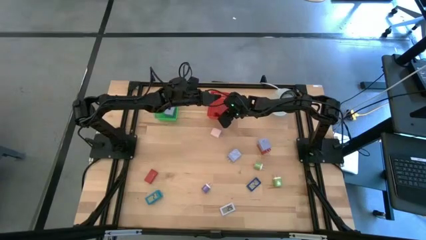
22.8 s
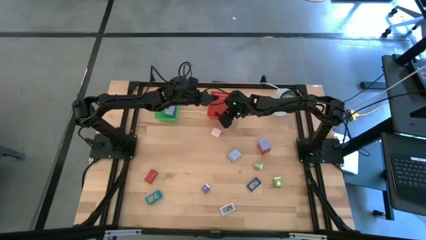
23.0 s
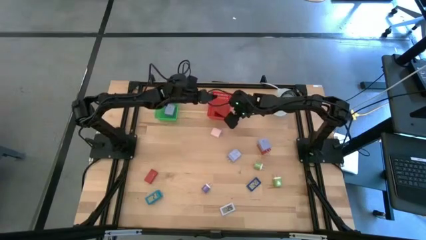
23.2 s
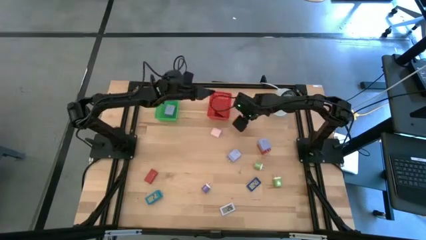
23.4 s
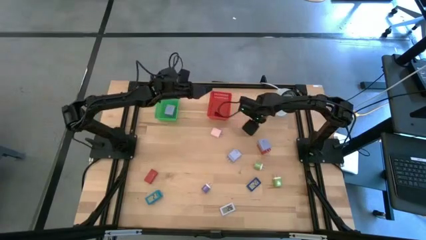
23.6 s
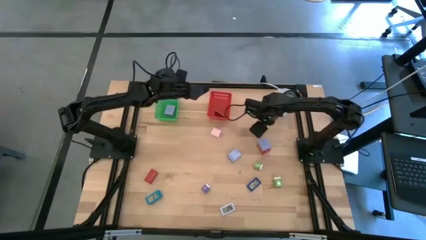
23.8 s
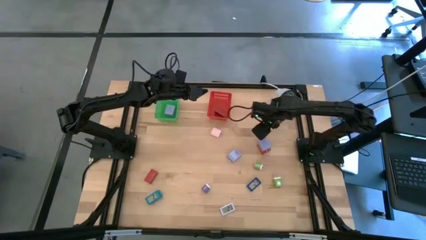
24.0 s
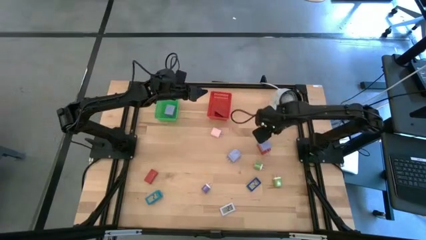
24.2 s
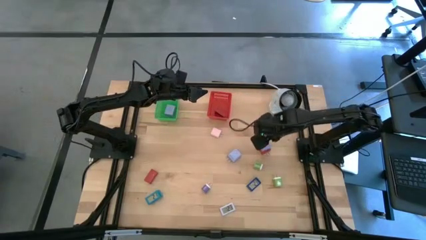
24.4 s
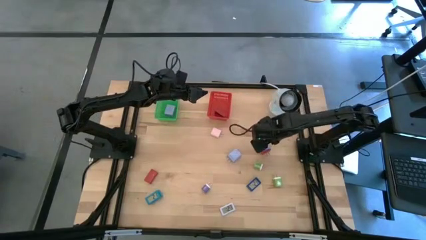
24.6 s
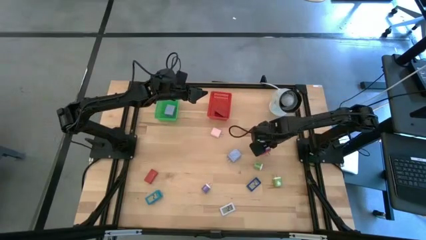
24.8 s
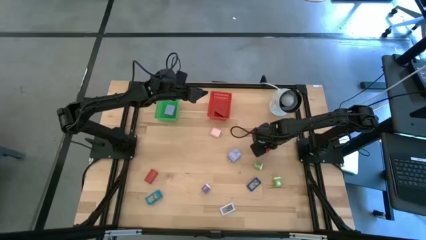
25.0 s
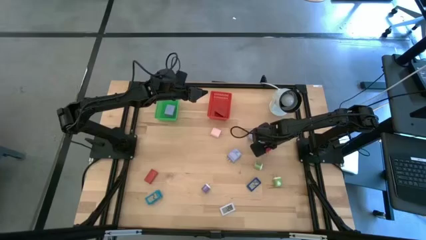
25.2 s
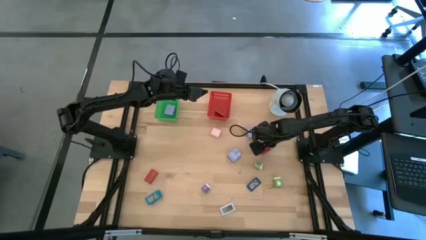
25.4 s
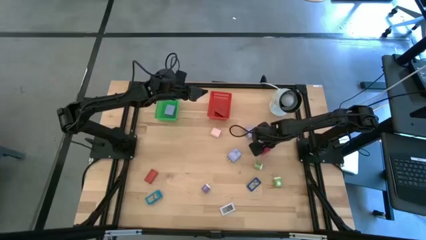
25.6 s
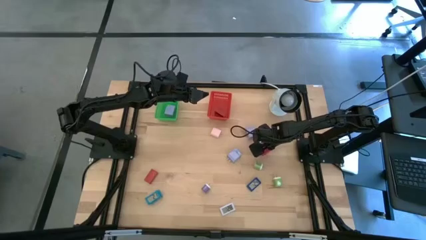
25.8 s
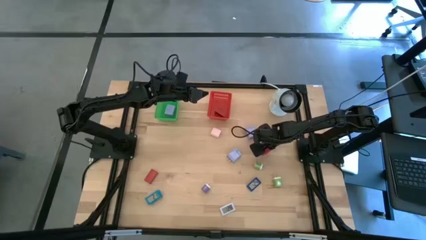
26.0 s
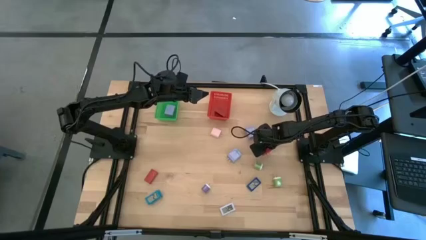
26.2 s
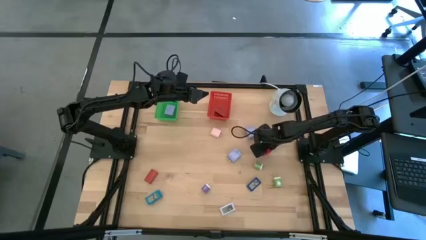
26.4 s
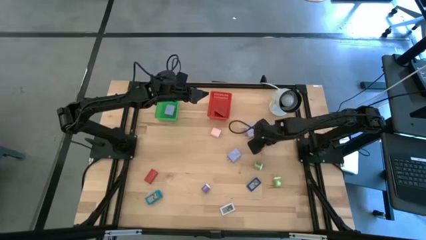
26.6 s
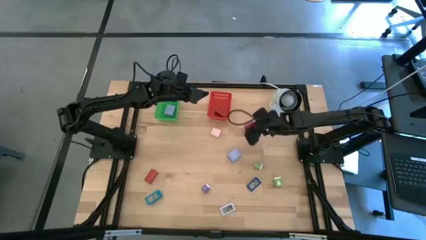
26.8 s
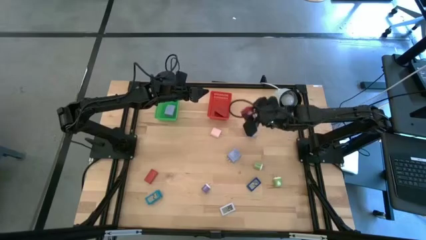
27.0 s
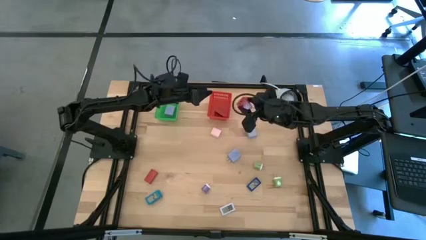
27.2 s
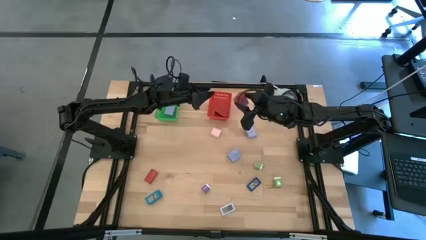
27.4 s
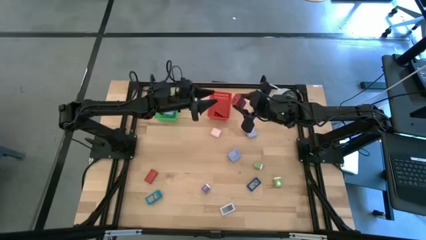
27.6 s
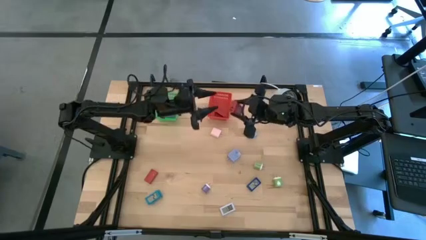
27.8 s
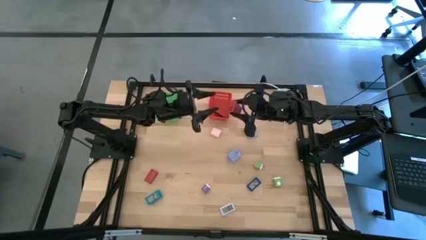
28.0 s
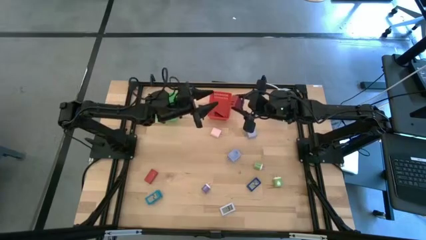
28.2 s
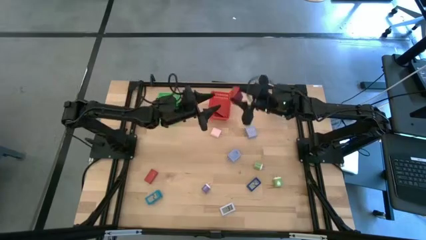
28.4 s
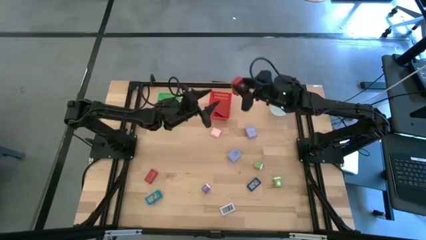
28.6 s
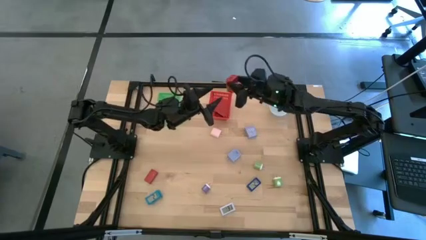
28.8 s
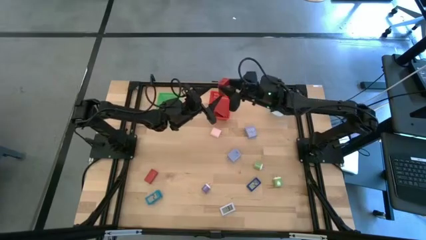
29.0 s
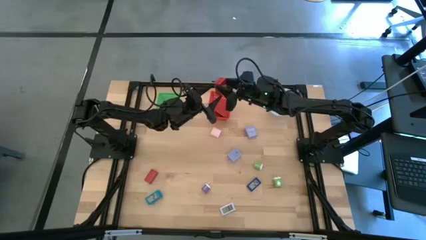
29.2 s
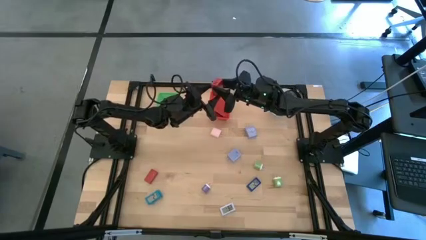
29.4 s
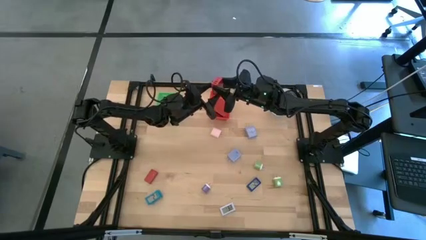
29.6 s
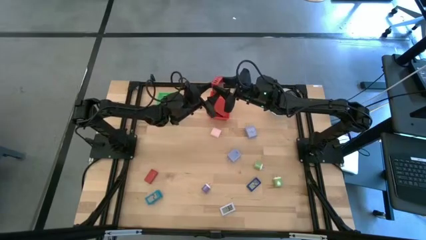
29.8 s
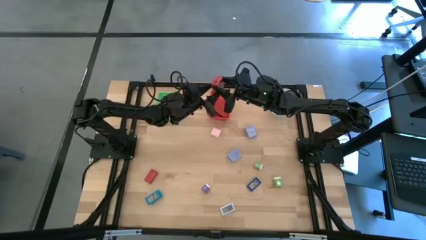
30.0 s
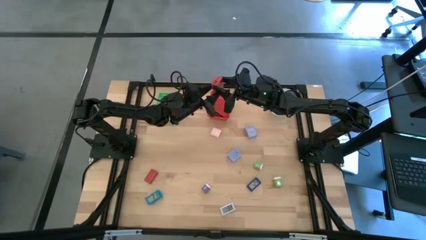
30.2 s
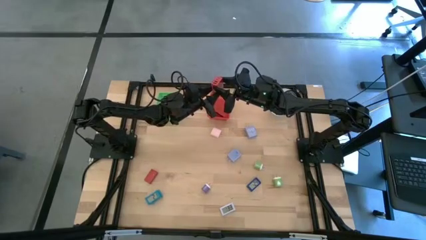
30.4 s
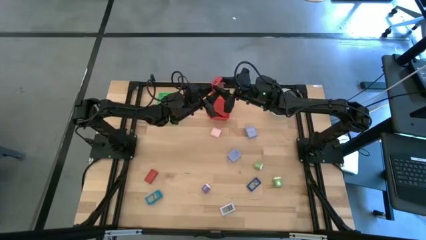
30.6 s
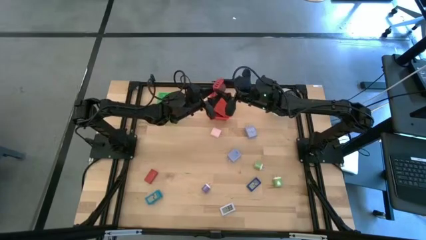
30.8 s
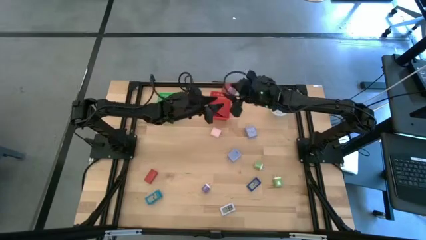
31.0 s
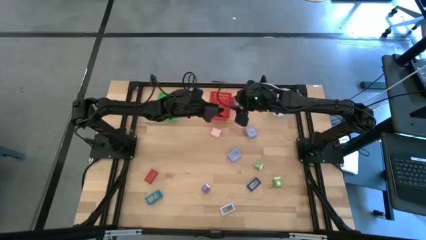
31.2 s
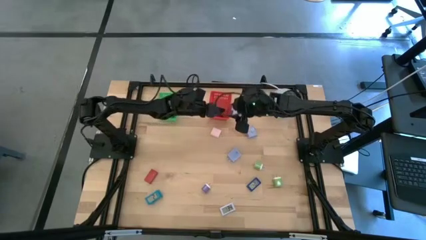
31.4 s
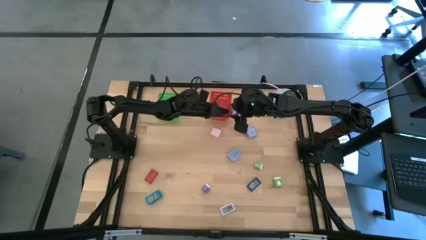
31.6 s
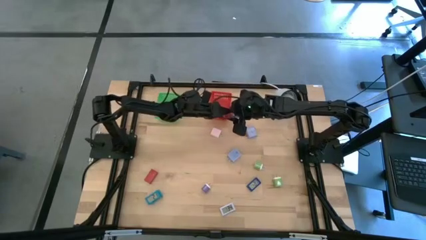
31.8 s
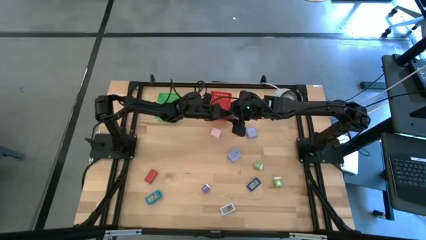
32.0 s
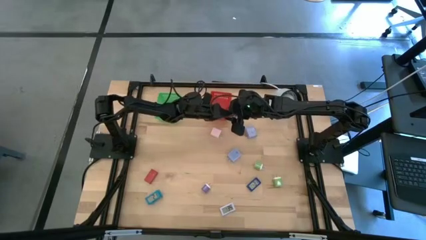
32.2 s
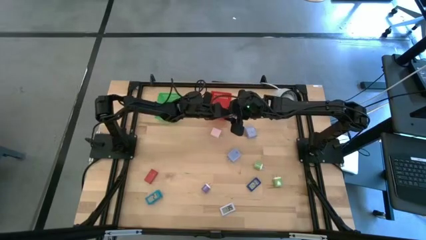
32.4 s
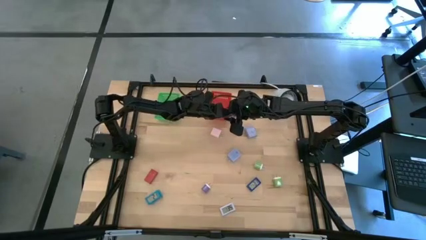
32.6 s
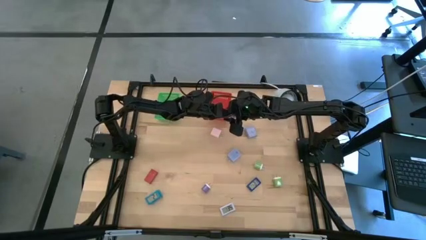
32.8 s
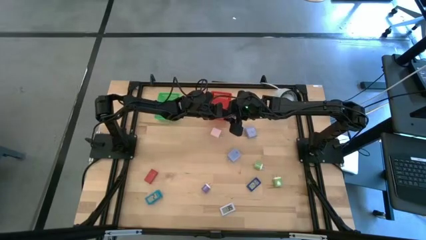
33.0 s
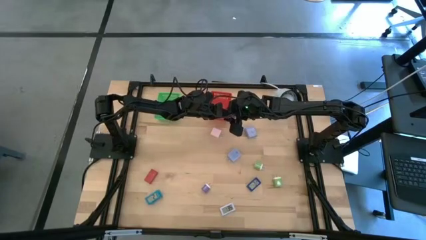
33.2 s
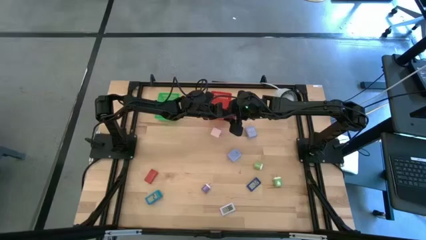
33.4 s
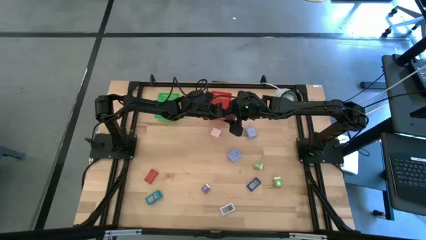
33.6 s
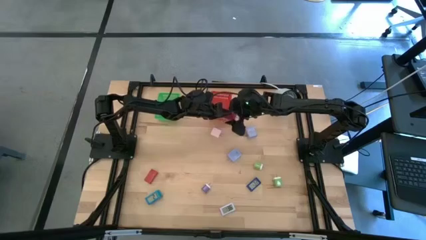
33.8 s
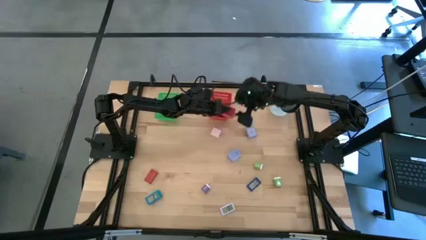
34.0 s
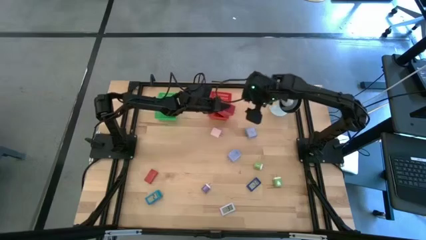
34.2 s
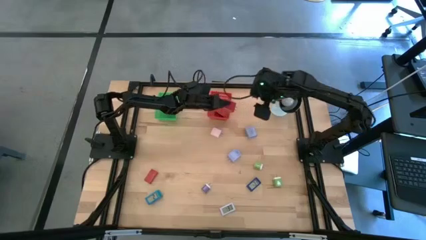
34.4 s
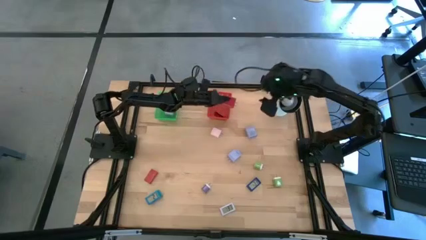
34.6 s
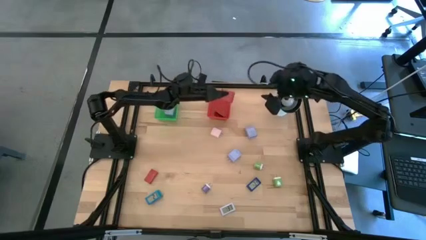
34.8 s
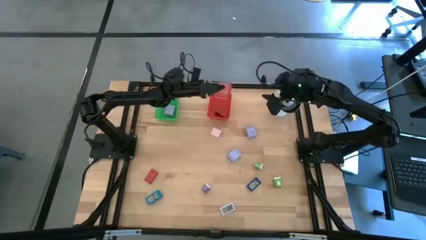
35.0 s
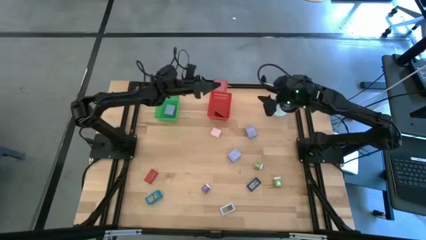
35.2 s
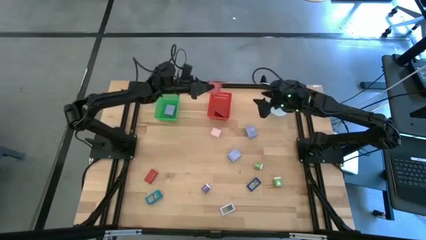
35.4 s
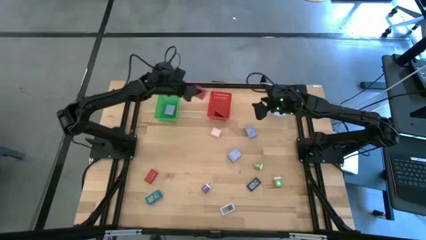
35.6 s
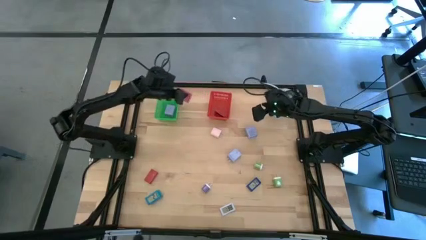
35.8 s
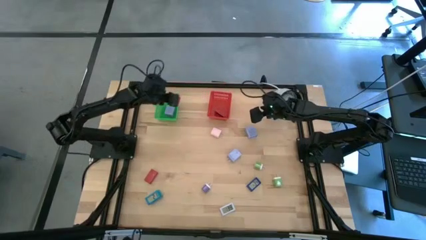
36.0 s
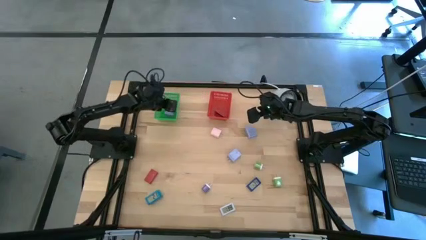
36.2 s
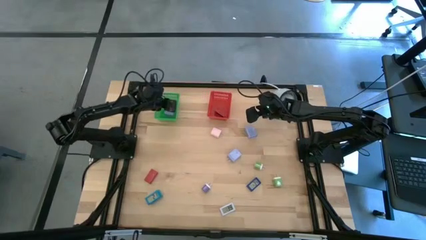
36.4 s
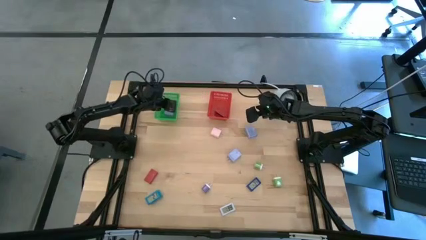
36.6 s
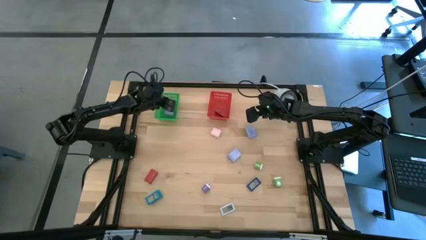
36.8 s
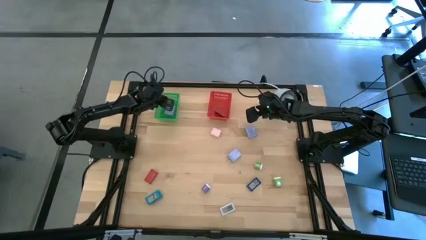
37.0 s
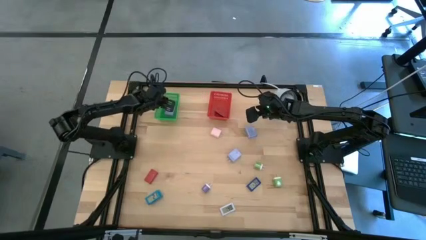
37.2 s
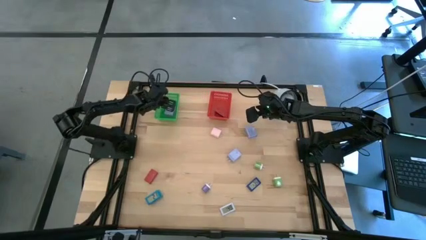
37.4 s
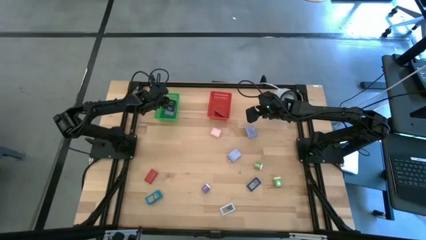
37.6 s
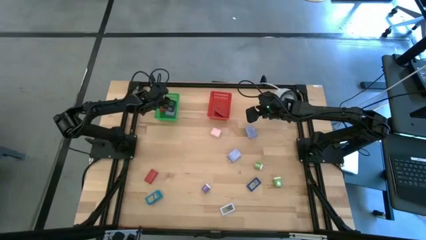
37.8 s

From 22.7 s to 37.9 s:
Task: Pick & Place Office items
Put the top red charger adapter into the green bin
